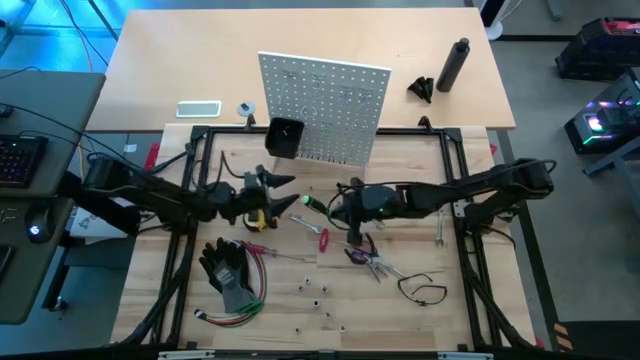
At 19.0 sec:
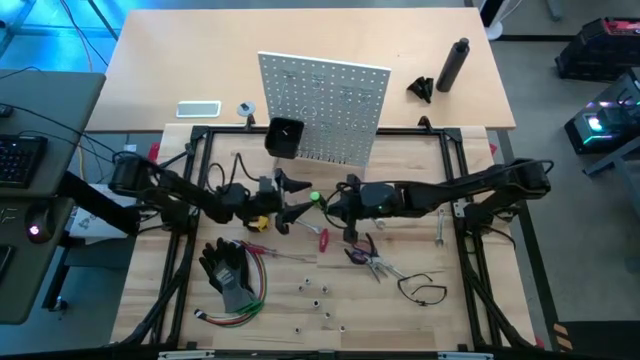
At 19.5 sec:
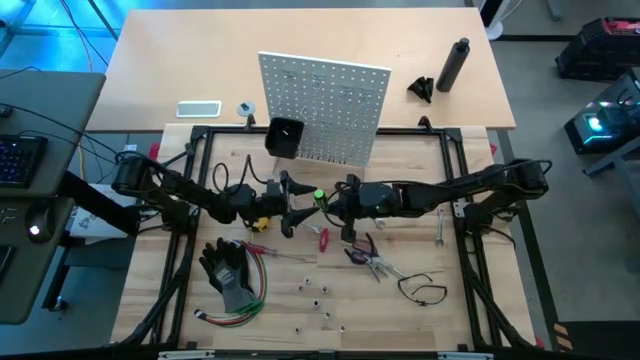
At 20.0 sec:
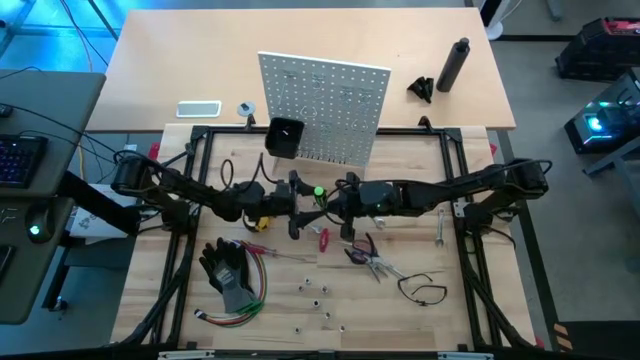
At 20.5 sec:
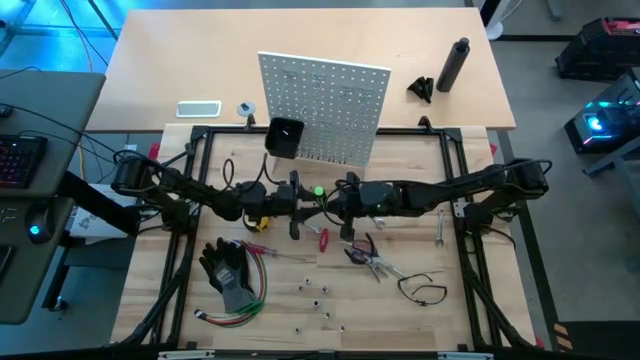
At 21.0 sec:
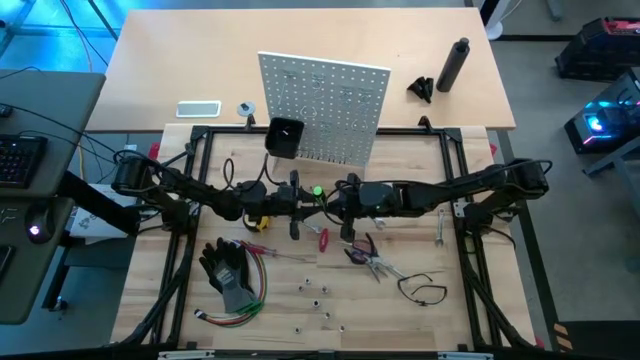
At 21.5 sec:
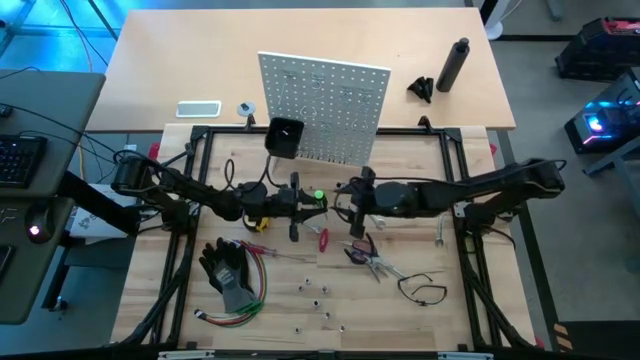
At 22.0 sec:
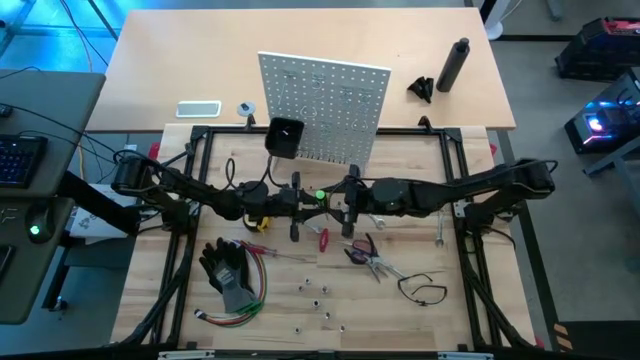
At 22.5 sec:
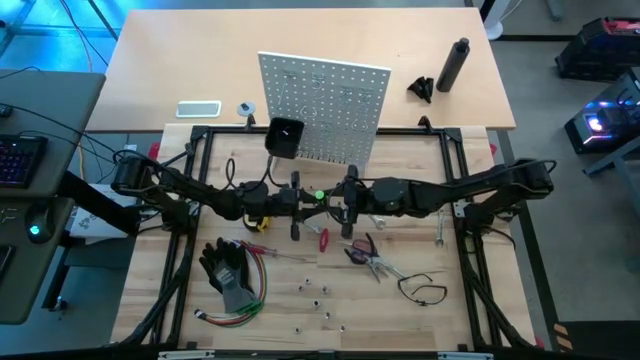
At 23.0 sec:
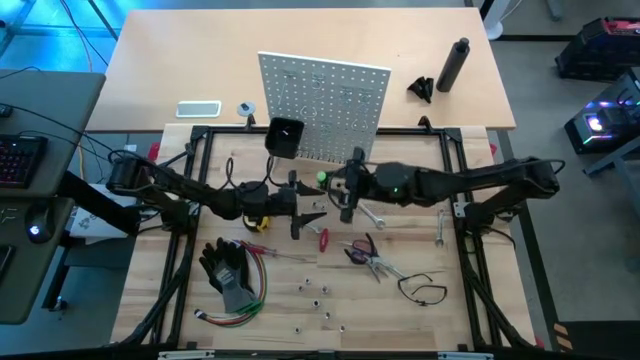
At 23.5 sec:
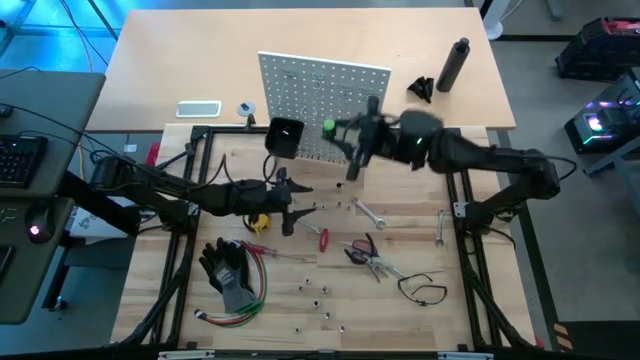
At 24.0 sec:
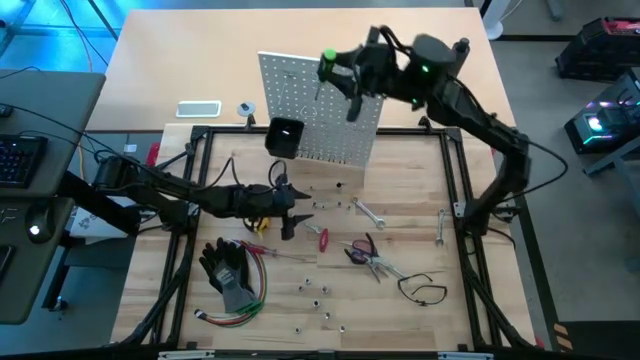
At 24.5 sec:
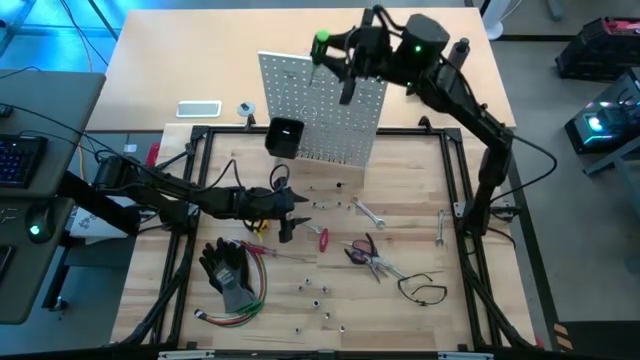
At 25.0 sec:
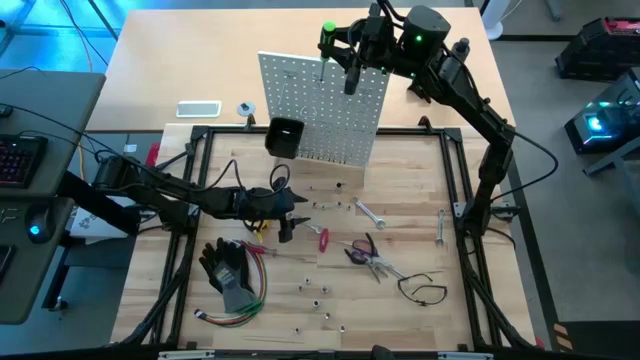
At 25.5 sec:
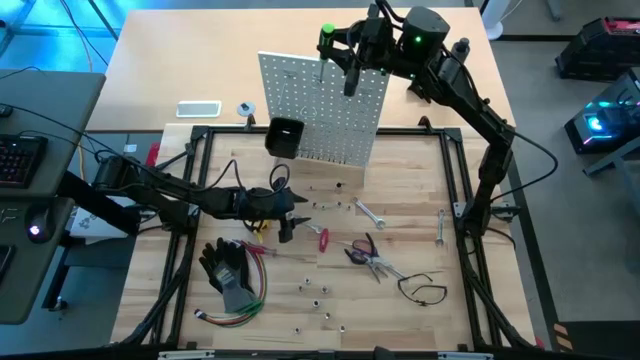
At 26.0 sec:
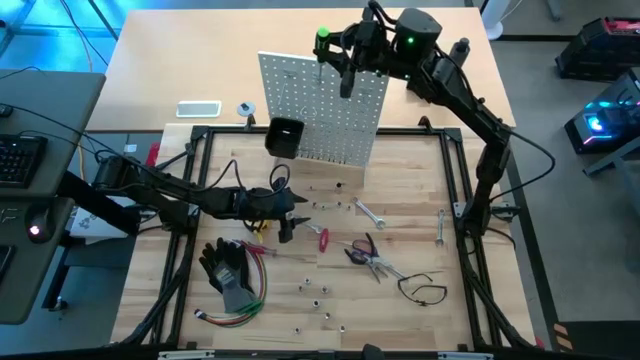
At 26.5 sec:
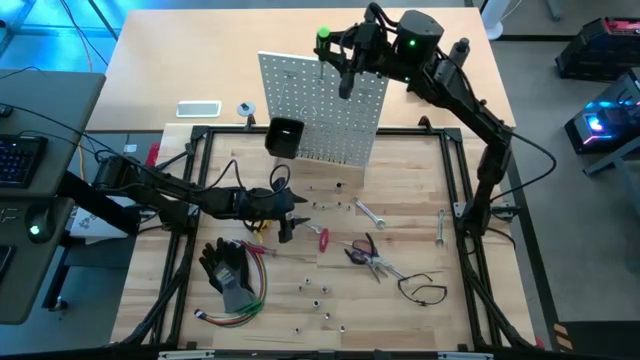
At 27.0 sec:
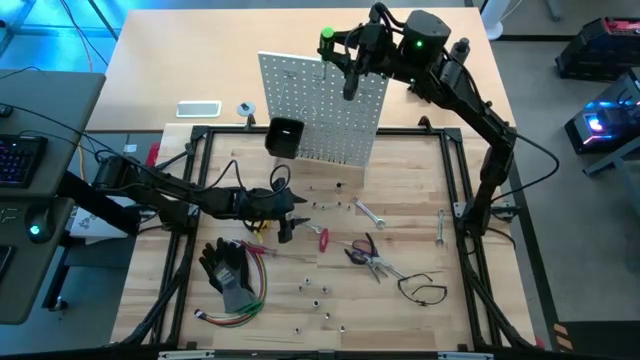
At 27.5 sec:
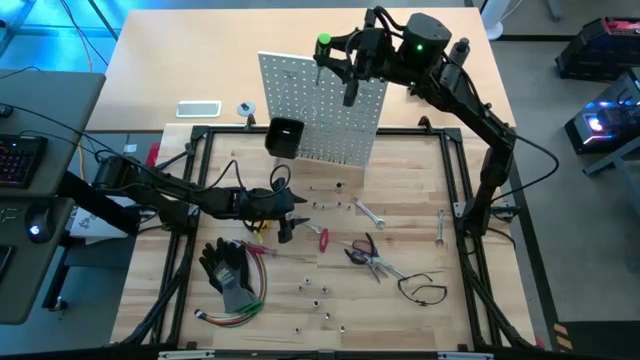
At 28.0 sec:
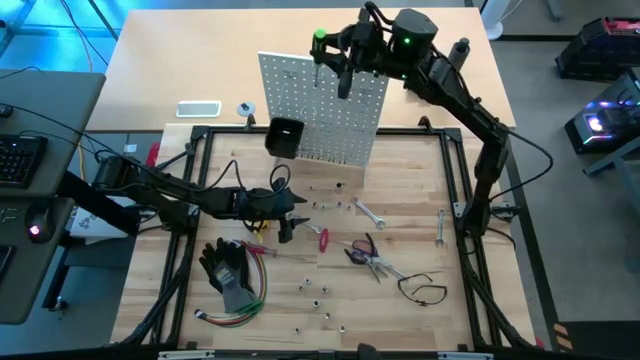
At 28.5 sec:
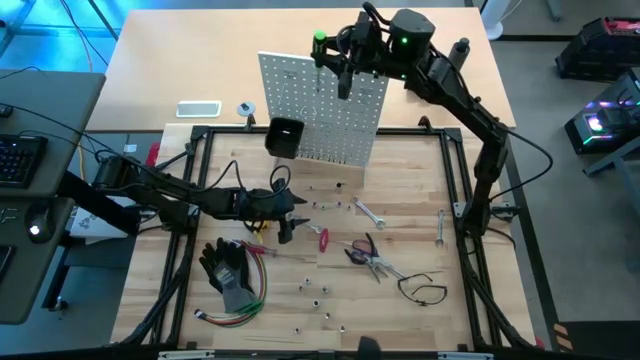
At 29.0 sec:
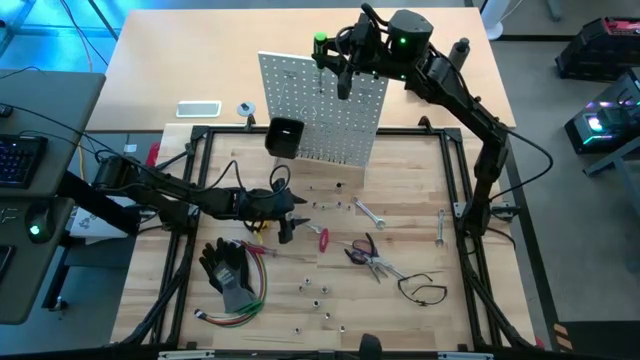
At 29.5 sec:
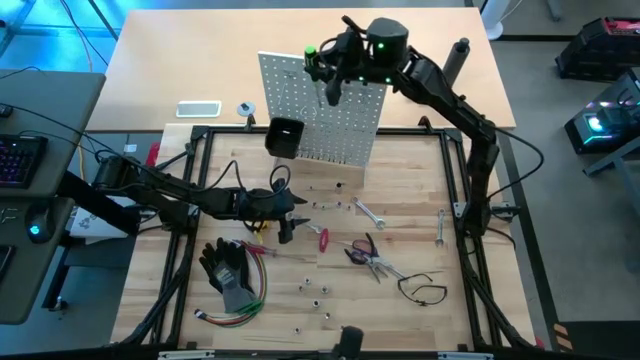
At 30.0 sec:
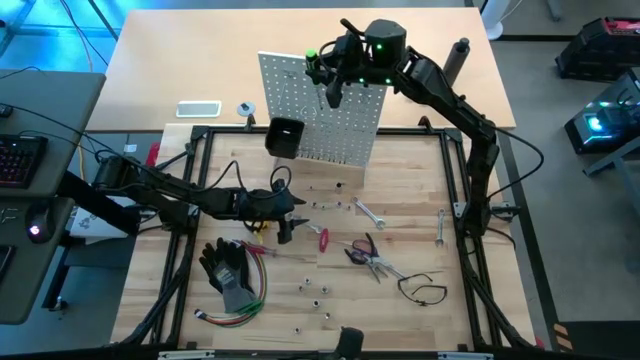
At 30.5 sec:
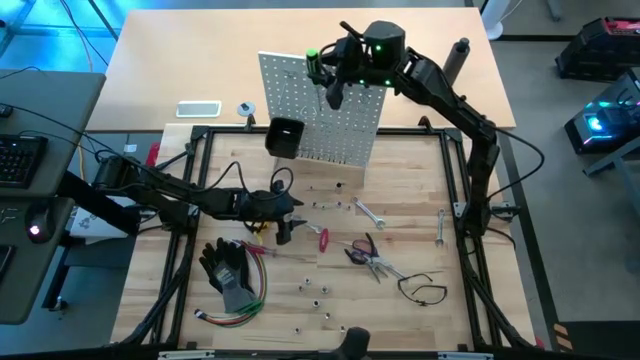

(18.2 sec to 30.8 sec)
Task: Hang tools onto peg board
Hang the green screwdriver on the white peg board
